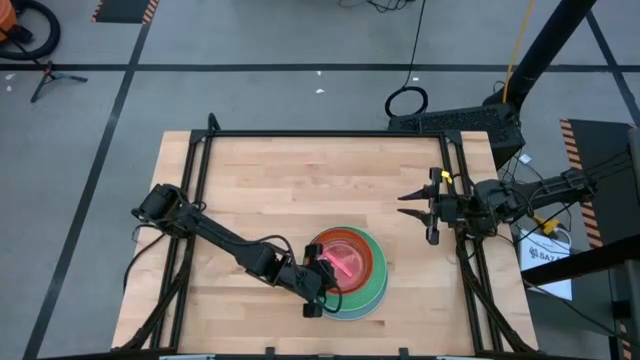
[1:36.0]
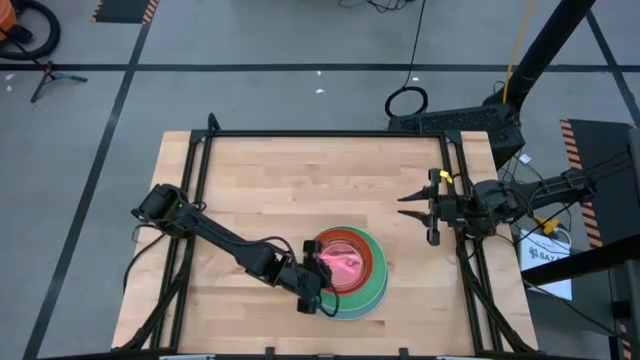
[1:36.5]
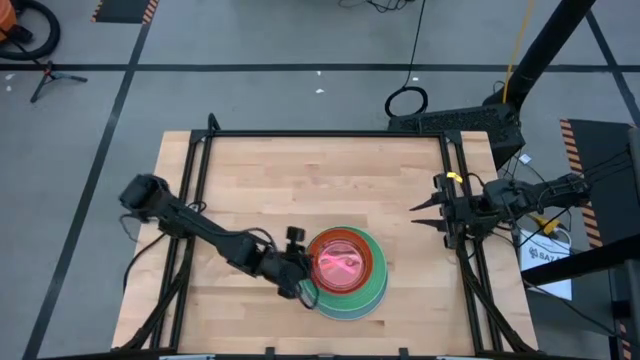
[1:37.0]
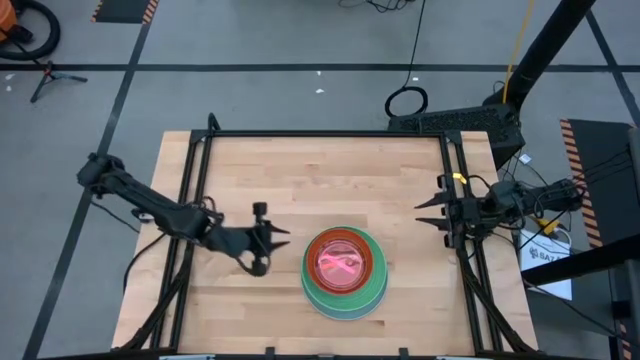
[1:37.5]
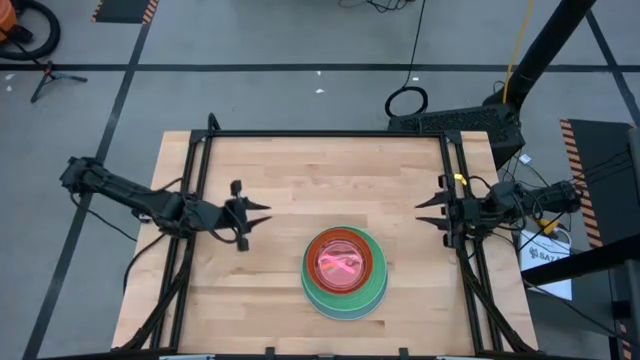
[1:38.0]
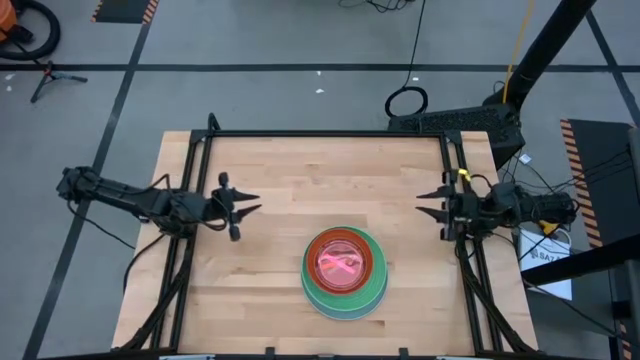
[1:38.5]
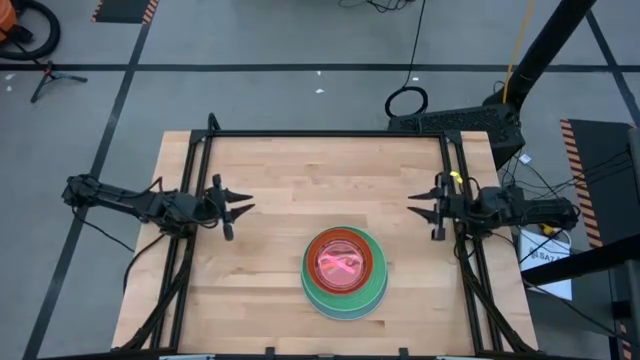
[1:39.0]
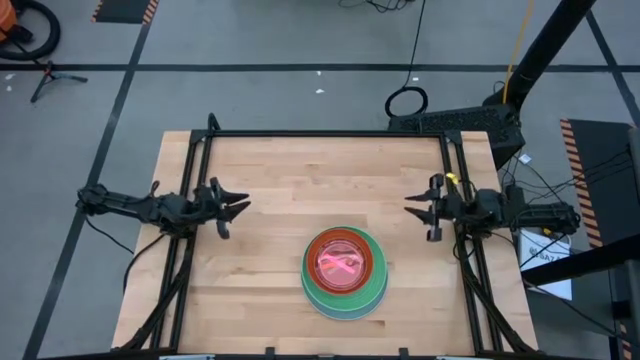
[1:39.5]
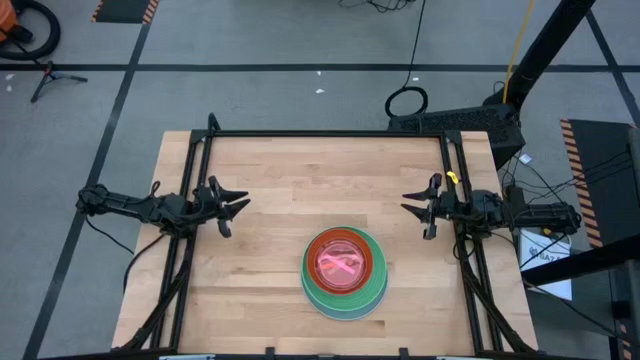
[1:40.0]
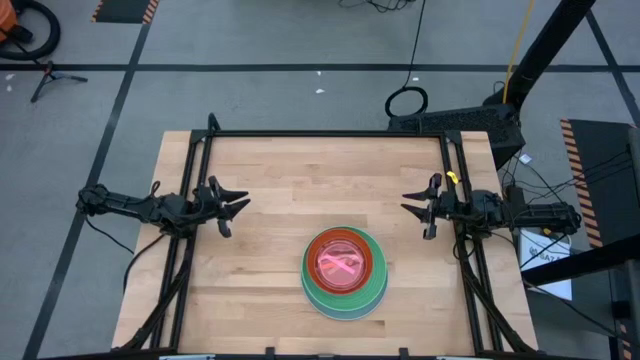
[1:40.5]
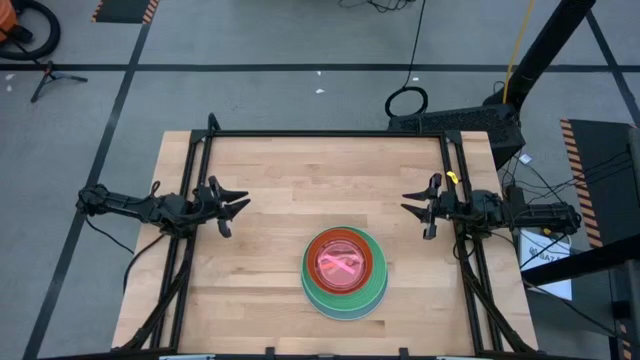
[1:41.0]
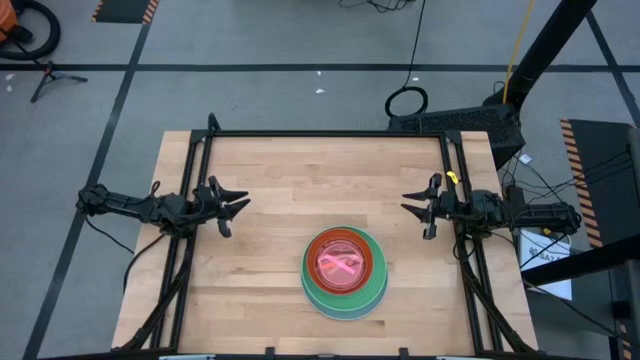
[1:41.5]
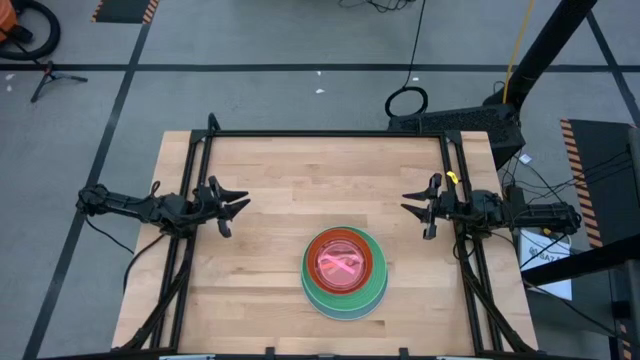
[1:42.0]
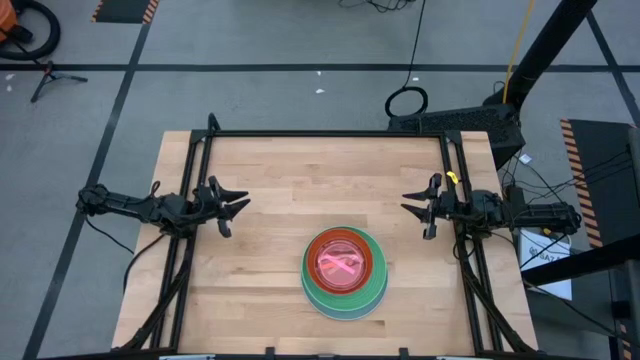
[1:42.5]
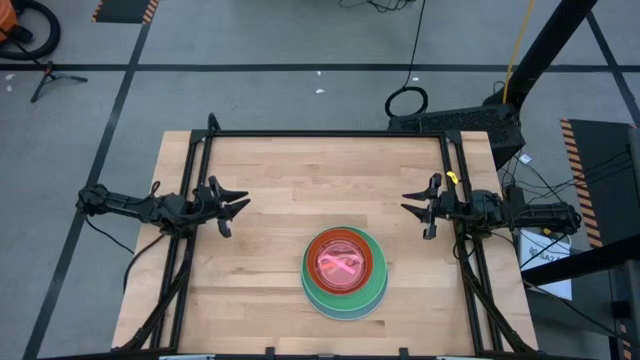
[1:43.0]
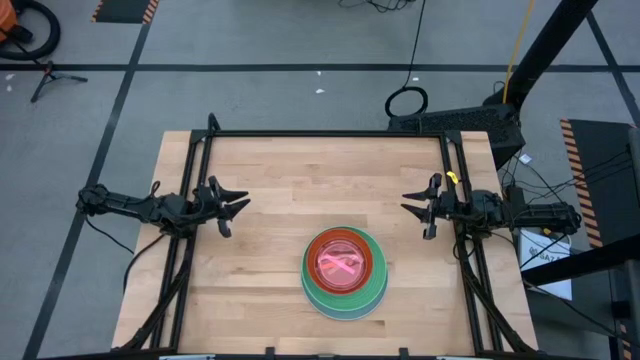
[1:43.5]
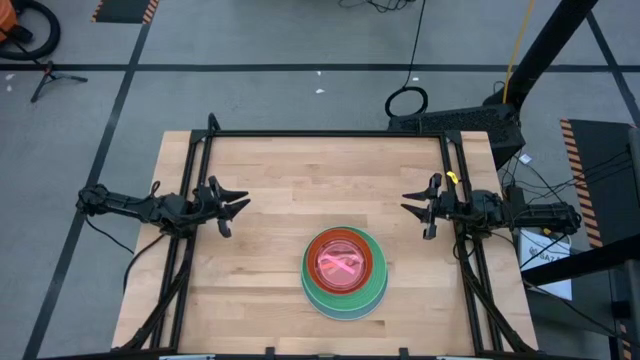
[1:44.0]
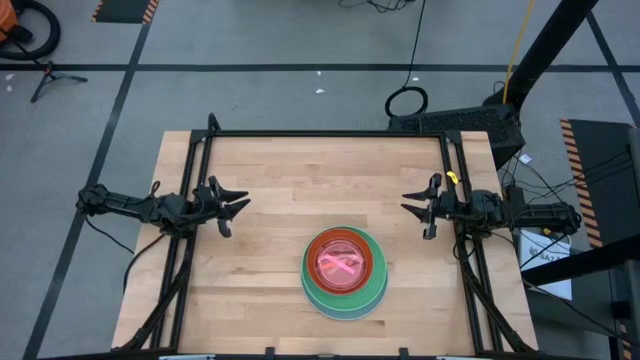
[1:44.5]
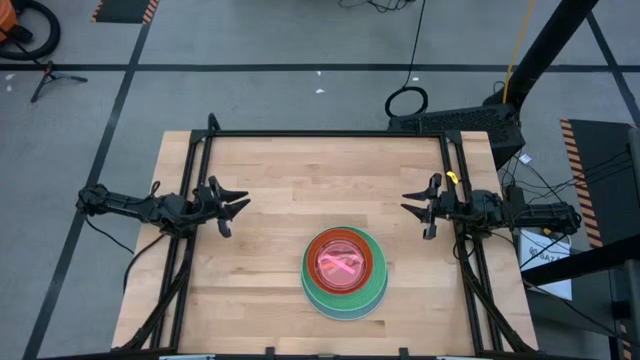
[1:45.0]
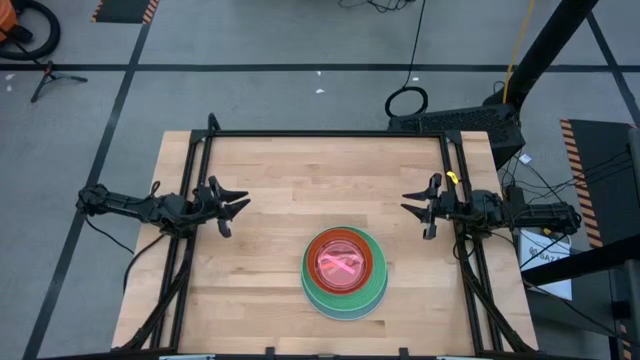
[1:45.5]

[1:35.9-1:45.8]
Task: Stack plastic plates
Return to Home Position

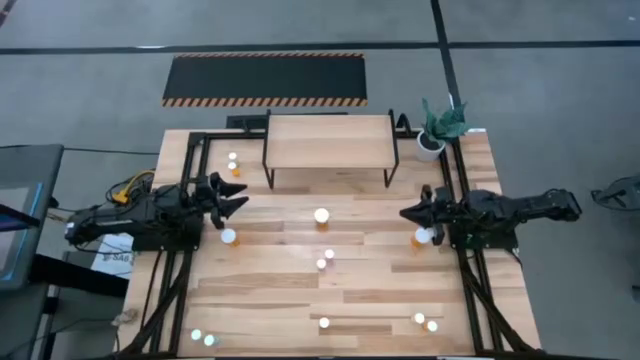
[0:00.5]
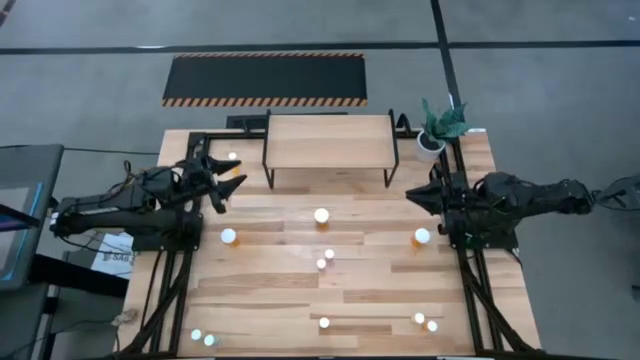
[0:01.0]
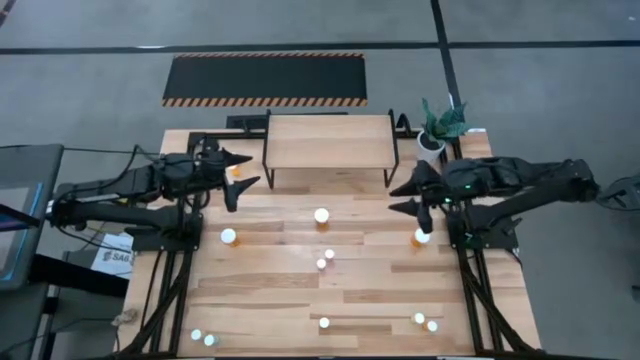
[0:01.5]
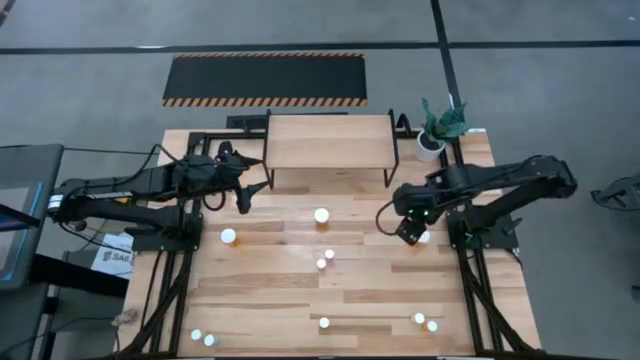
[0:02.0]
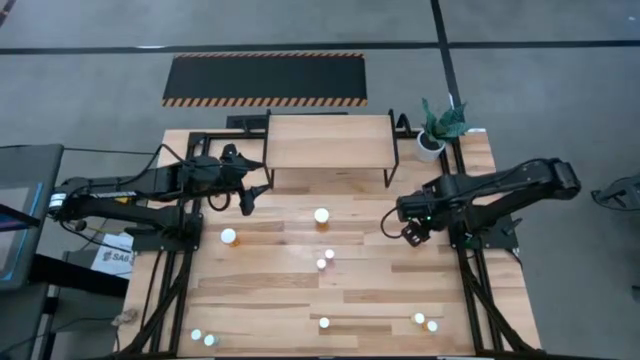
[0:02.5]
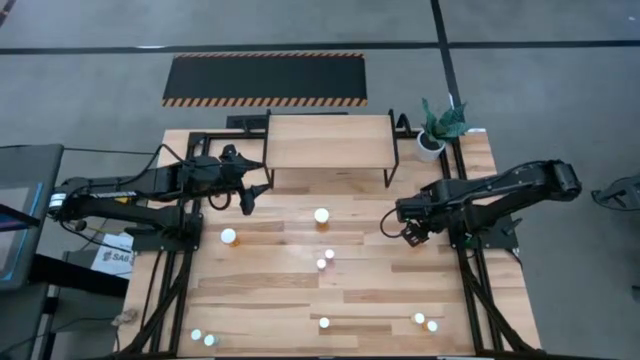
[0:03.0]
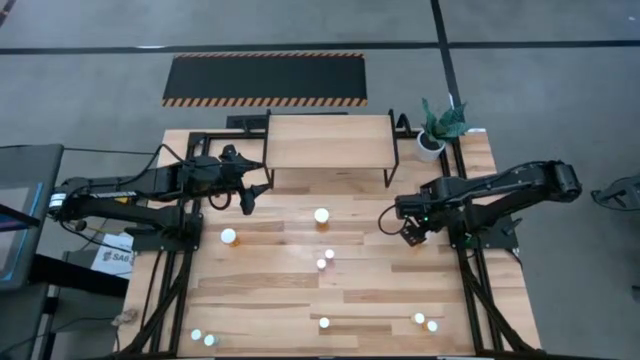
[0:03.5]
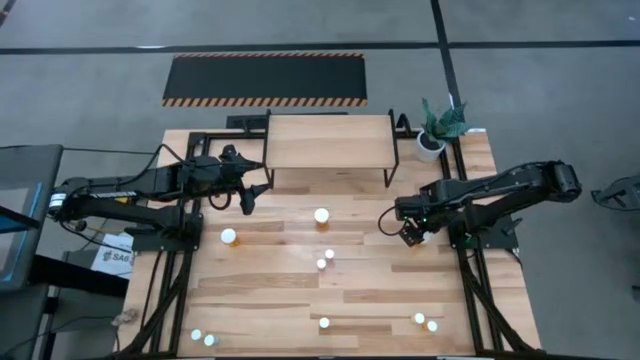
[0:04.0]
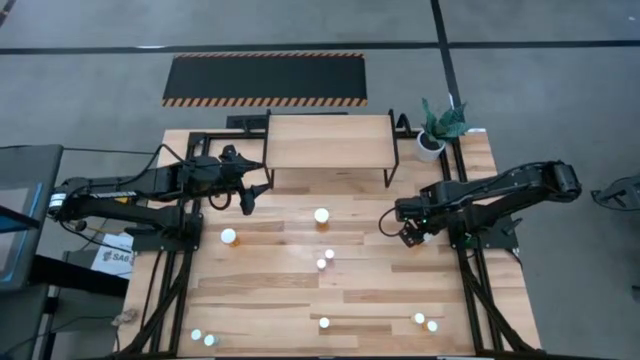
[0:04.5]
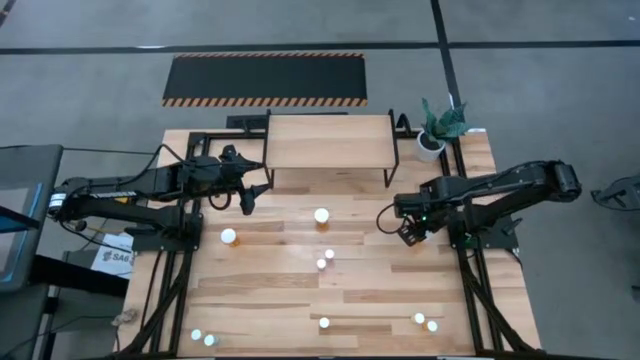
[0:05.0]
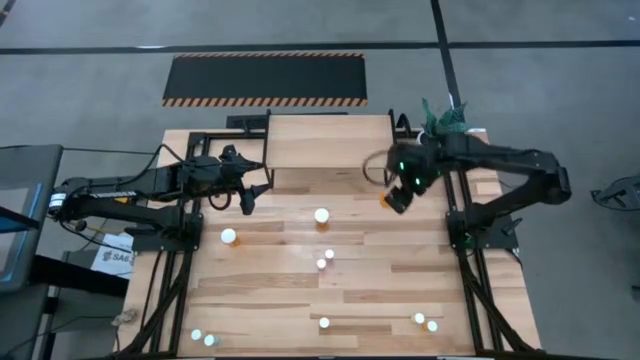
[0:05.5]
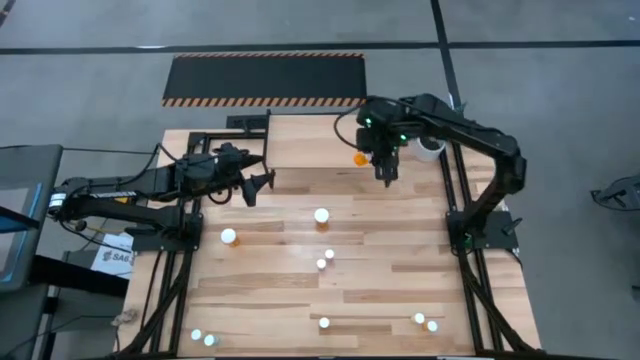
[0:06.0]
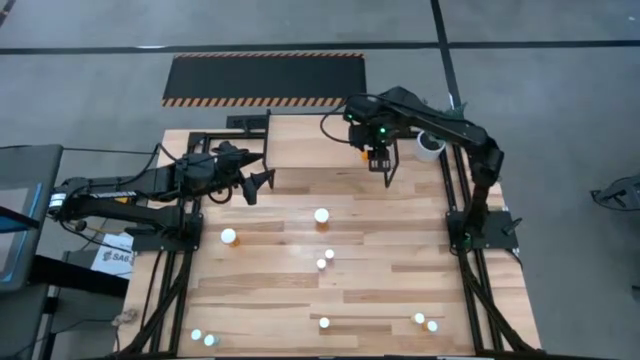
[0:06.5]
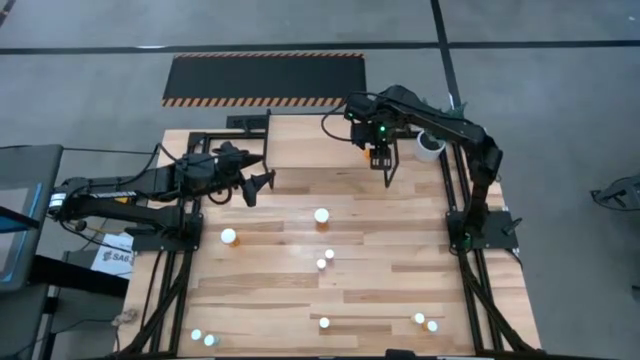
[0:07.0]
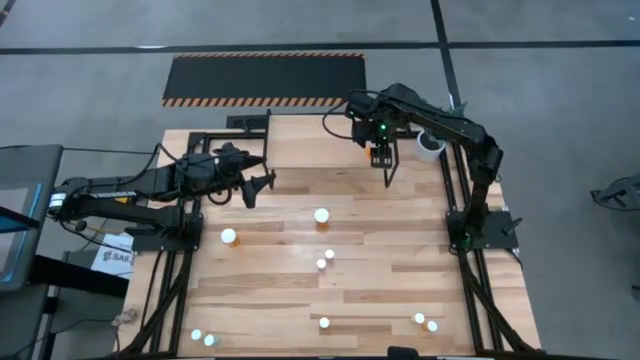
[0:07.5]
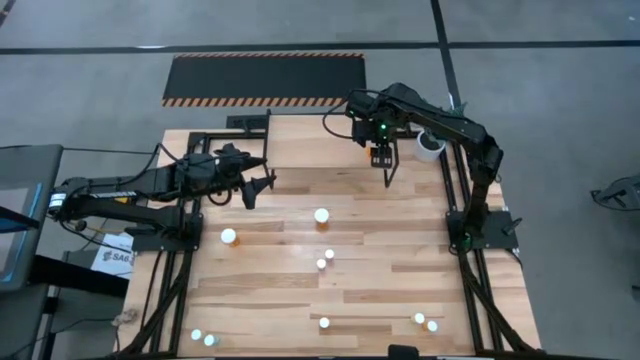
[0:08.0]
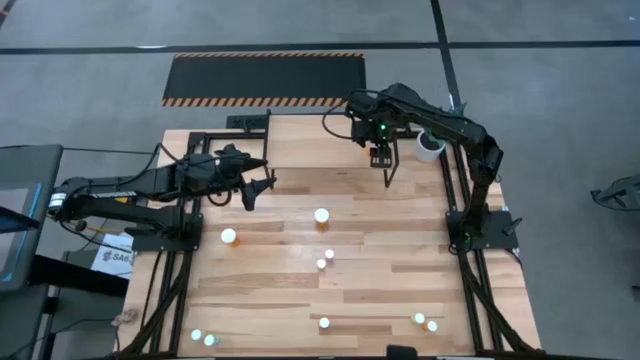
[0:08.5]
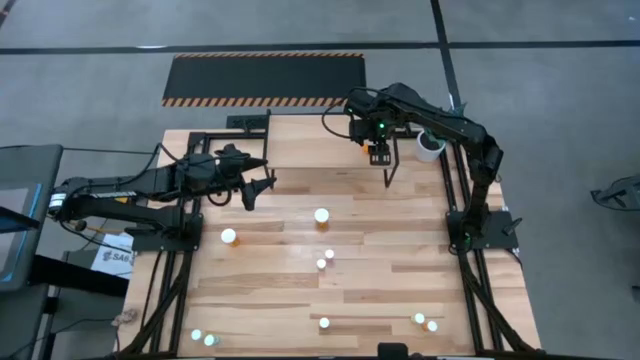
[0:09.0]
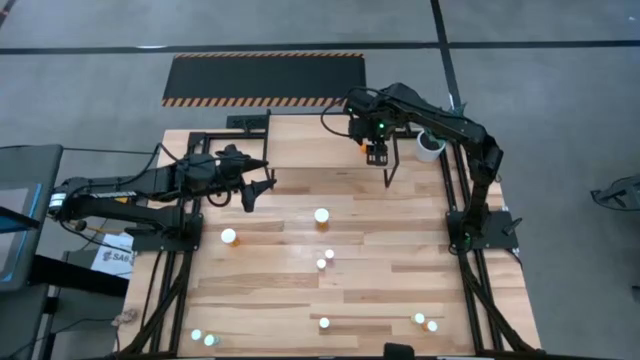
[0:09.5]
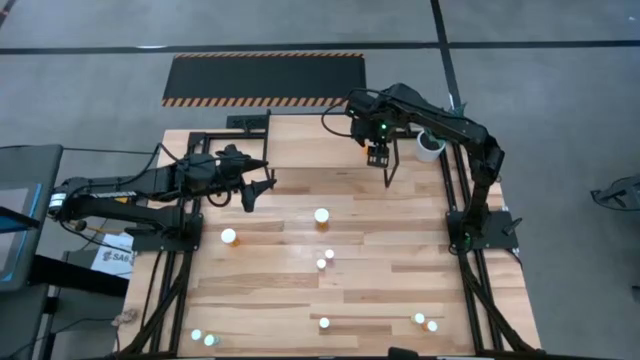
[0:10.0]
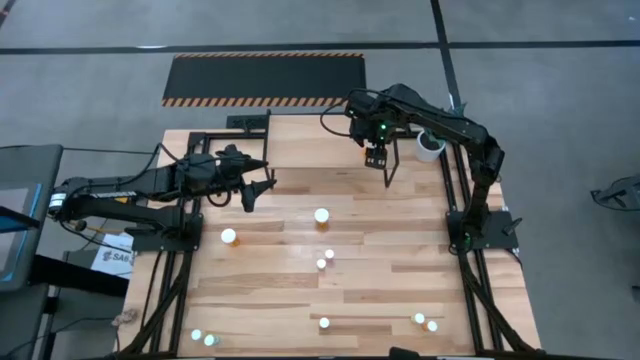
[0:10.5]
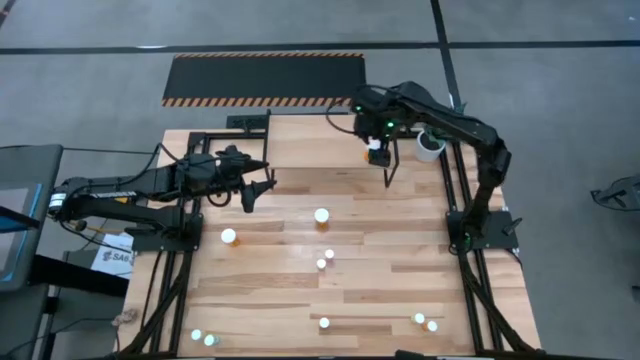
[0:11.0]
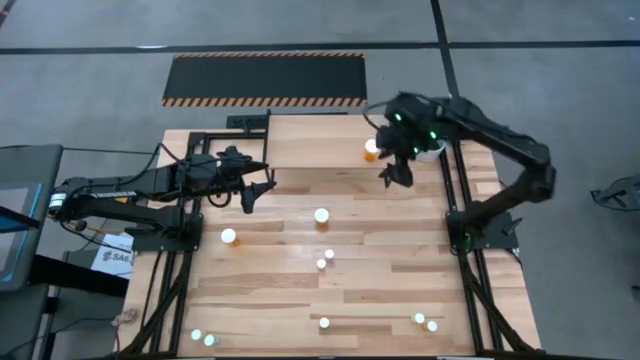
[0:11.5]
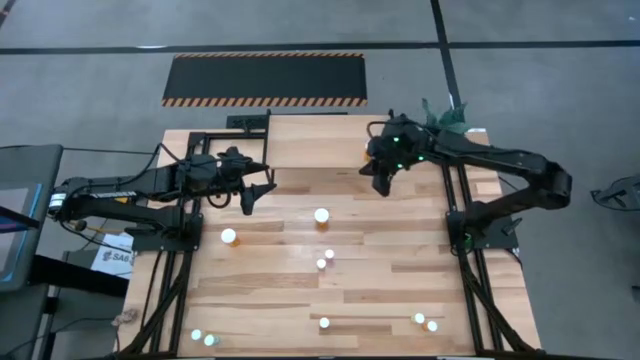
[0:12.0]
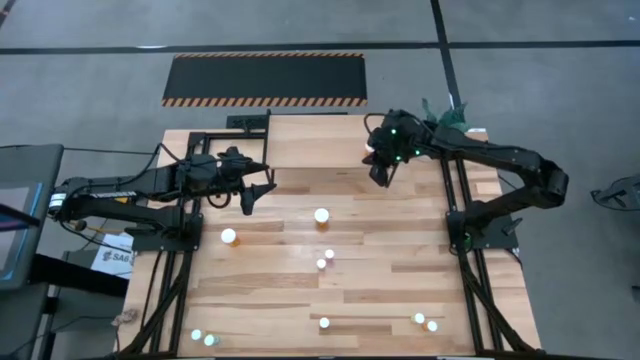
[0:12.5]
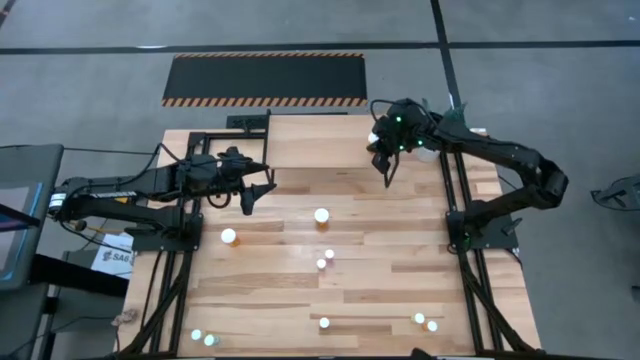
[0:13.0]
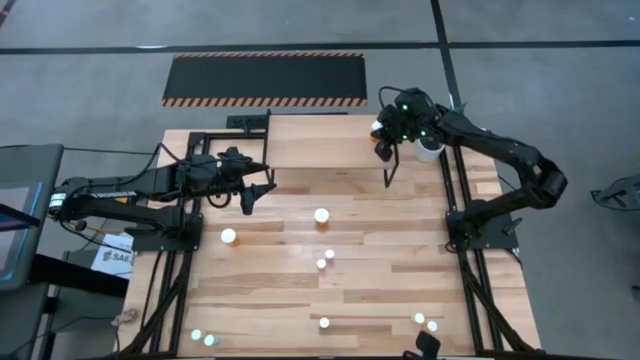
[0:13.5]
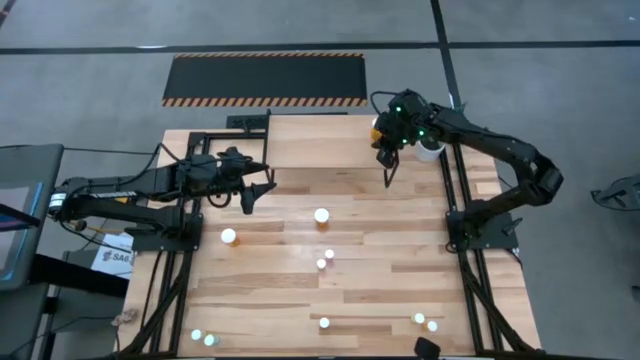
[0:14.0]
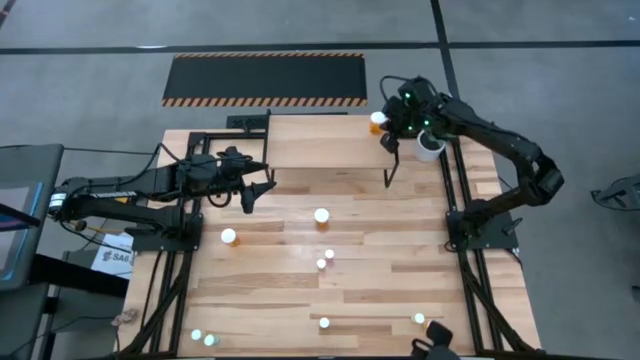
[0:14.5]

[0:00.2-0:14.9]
Task: Pick and place medicine bottles onto shelf by color
Put the right large orange pill bottle on the shelf
